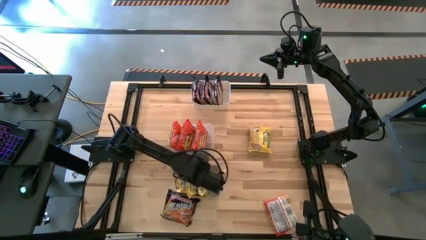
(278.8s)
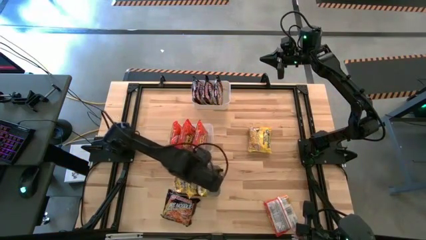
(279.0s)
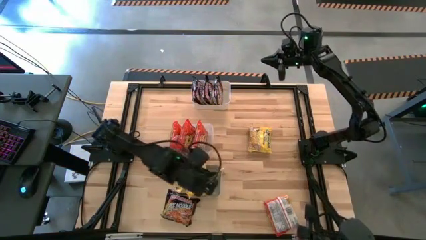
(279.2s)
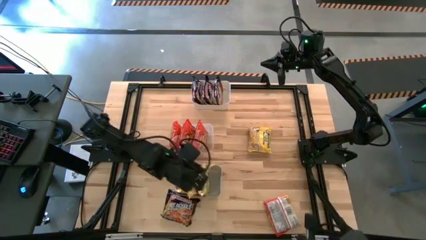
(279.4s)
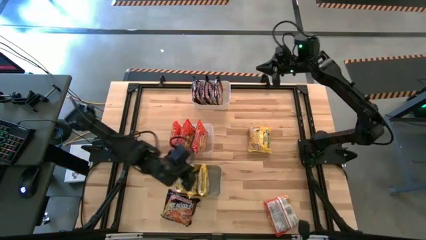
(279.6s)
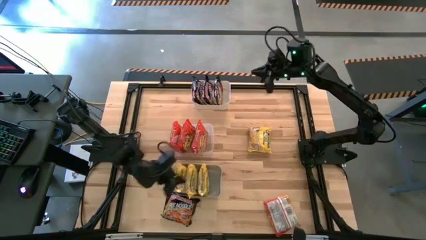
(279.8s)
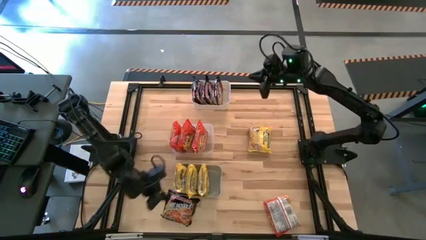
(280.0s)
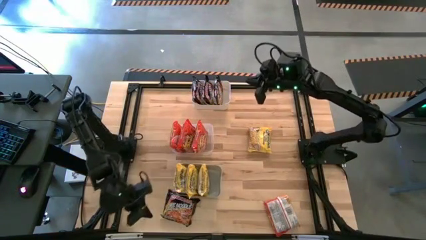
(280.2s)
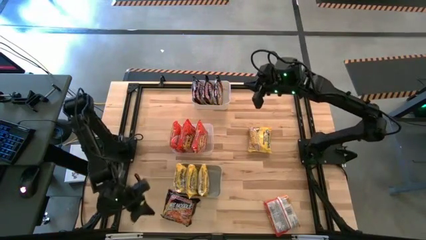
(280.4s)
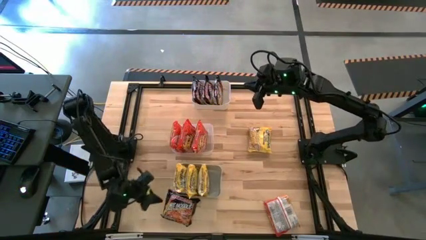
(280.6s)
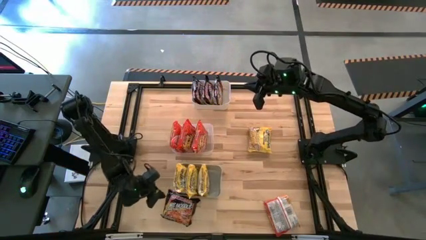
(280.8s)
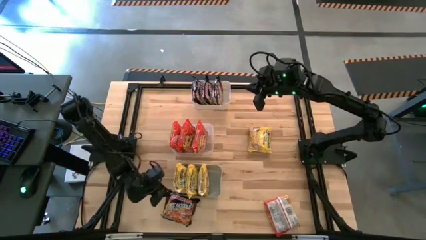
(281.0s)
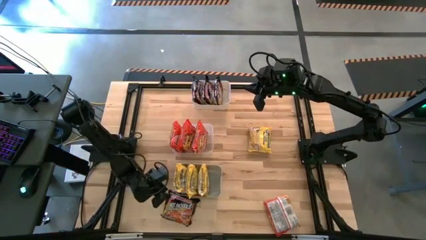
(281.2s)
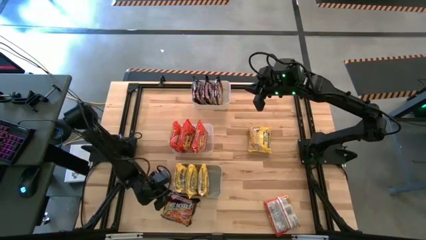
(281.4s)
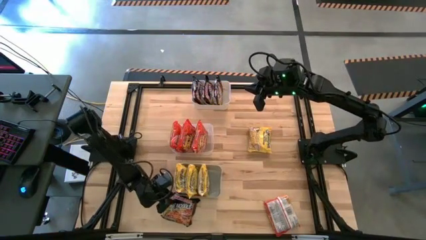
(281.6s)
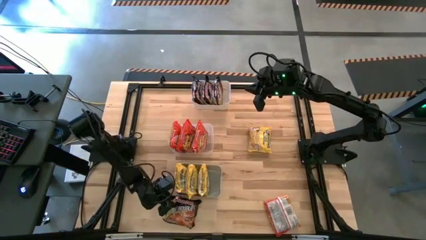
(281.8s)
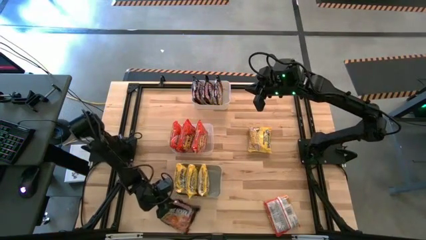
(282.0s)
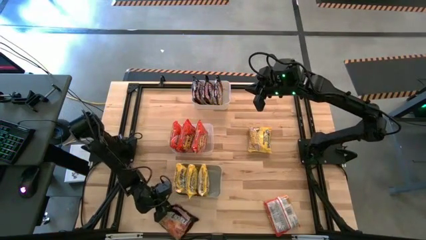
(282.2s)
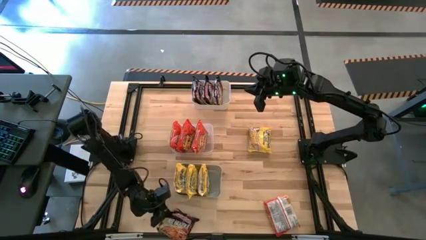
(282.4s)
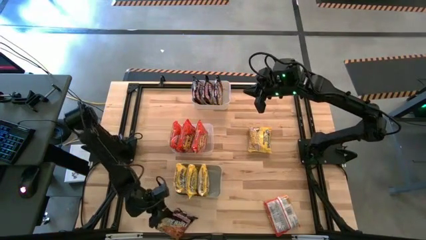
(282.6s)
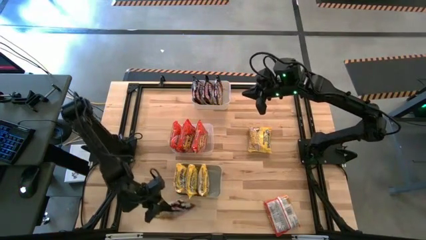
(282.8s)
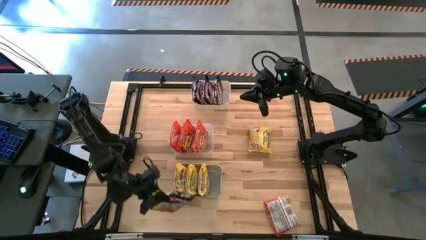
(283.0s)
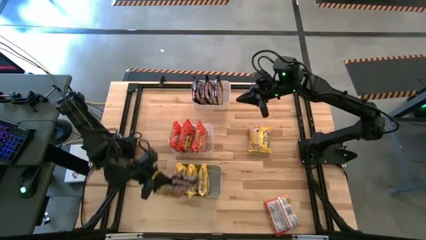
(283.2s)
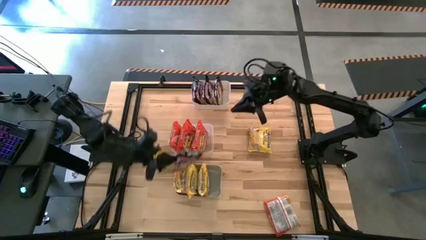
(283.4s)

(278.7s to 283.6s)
Task: Sort Maruchan noodles
Put the black noodle pack into the white bin

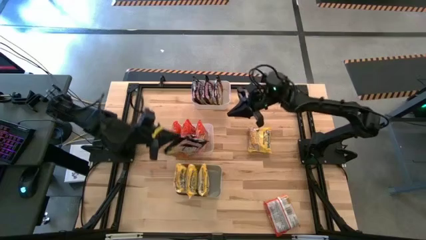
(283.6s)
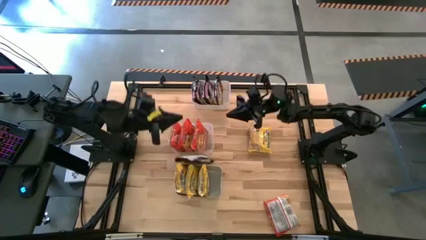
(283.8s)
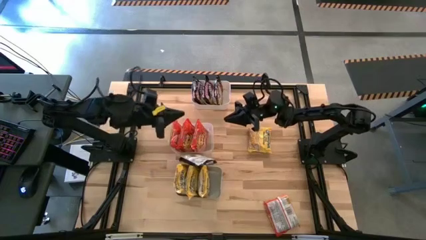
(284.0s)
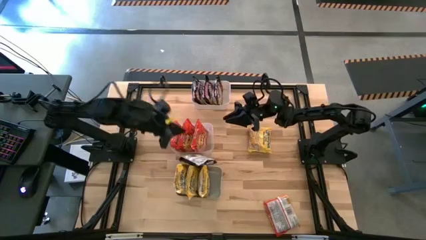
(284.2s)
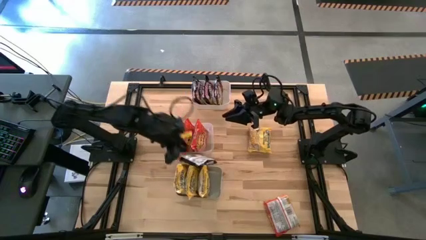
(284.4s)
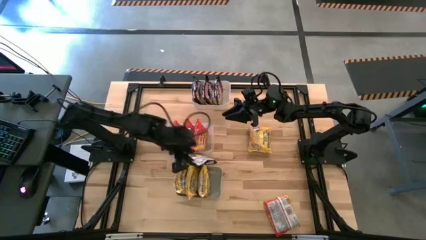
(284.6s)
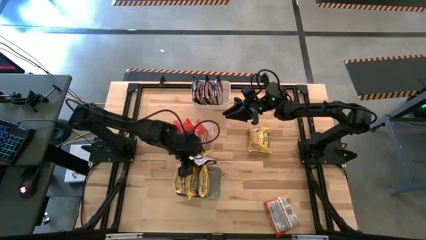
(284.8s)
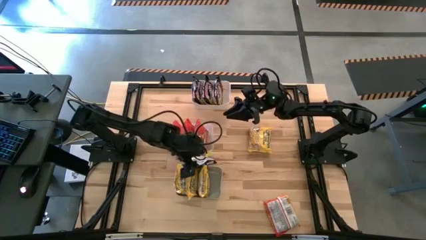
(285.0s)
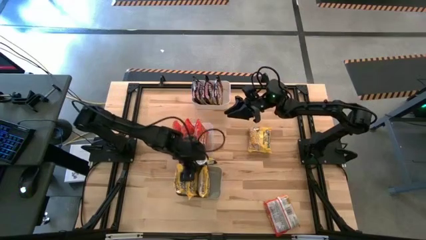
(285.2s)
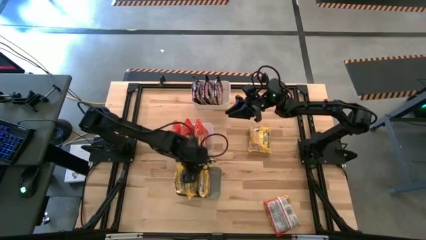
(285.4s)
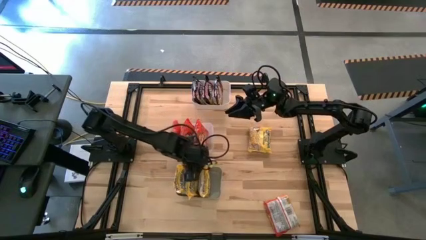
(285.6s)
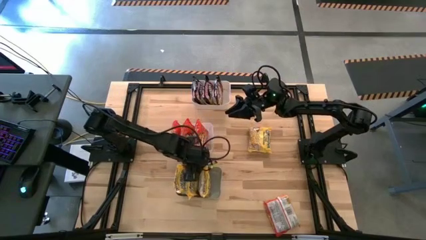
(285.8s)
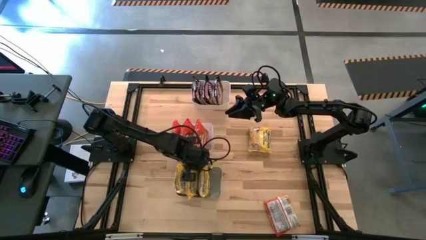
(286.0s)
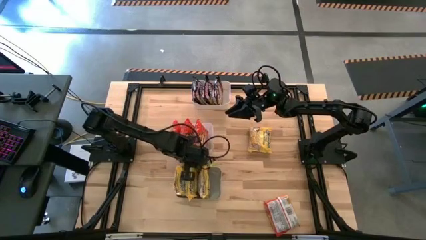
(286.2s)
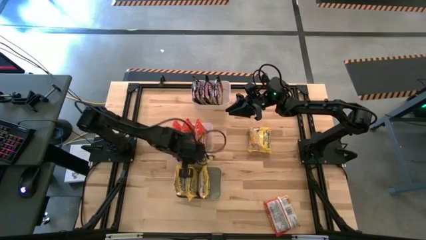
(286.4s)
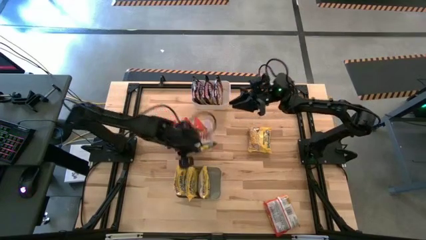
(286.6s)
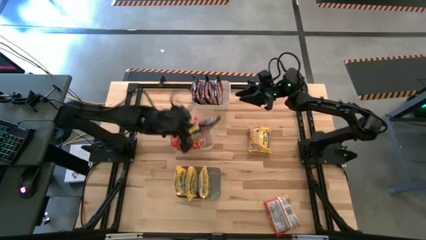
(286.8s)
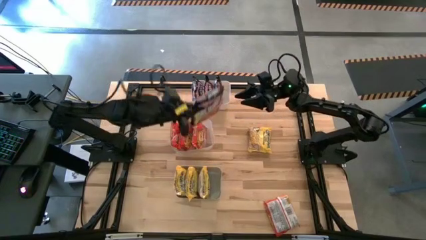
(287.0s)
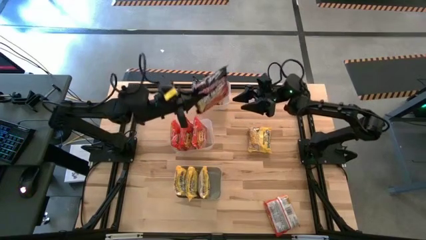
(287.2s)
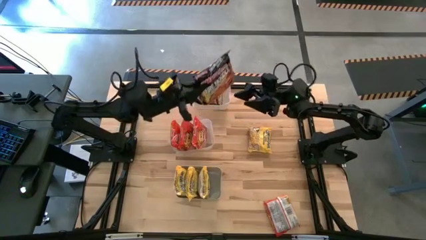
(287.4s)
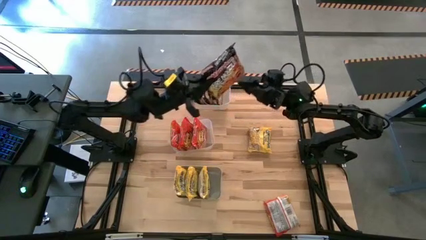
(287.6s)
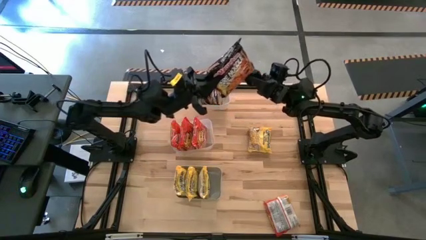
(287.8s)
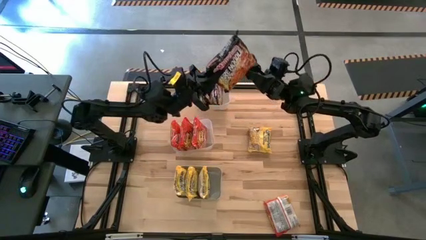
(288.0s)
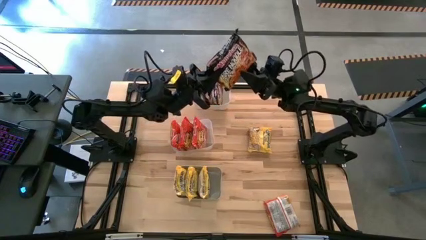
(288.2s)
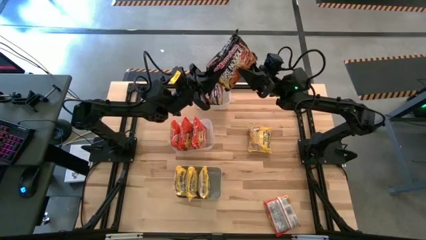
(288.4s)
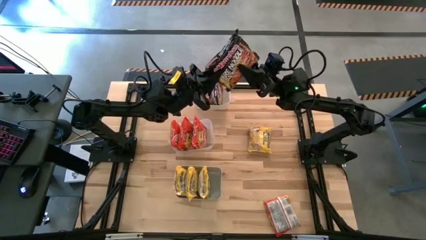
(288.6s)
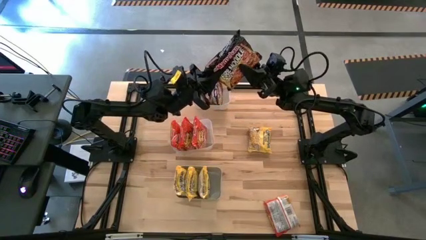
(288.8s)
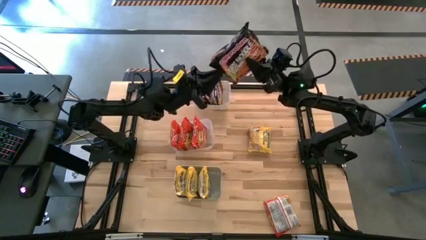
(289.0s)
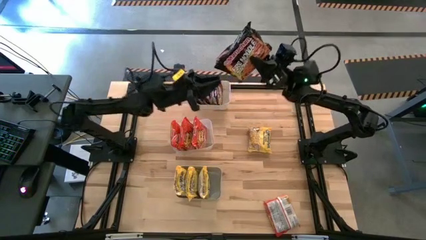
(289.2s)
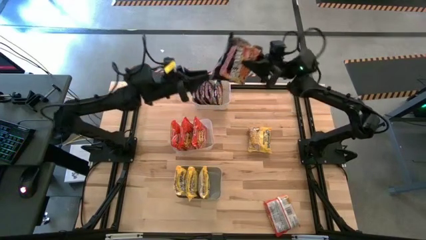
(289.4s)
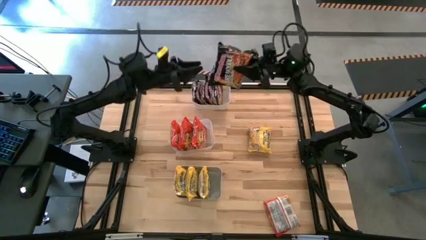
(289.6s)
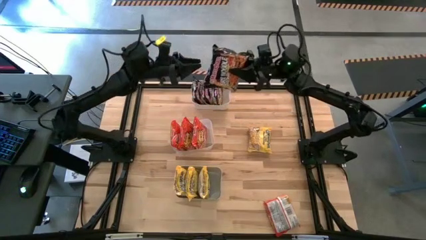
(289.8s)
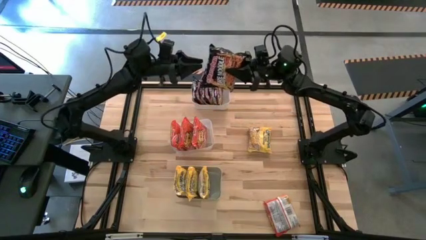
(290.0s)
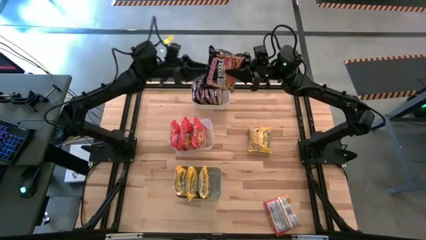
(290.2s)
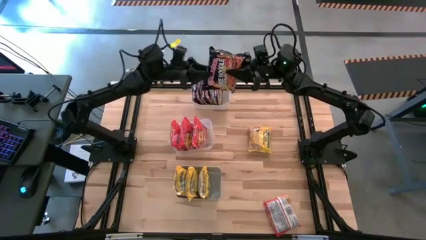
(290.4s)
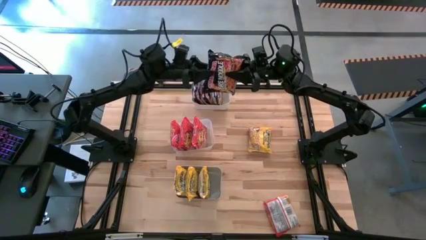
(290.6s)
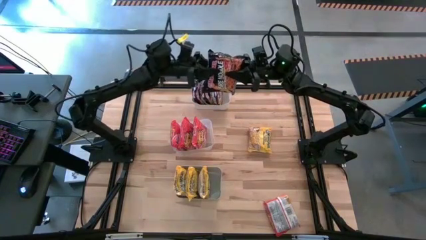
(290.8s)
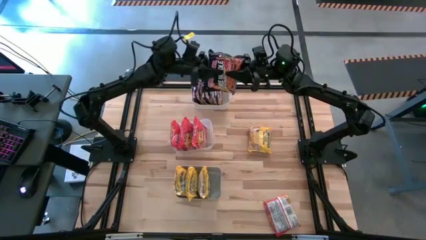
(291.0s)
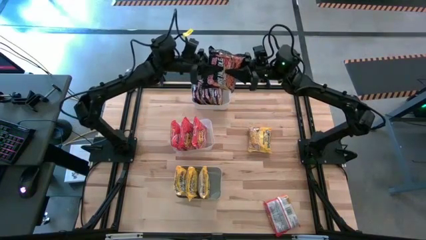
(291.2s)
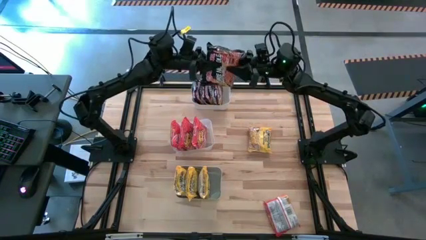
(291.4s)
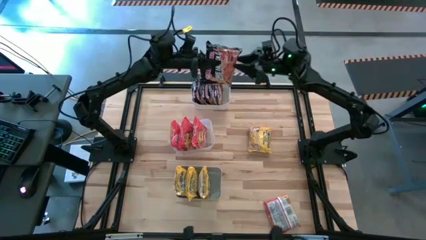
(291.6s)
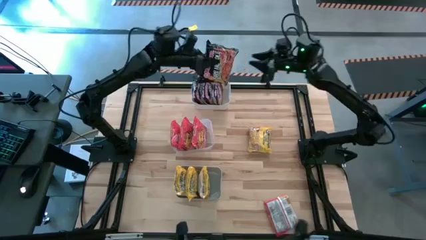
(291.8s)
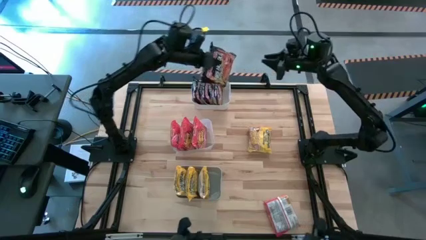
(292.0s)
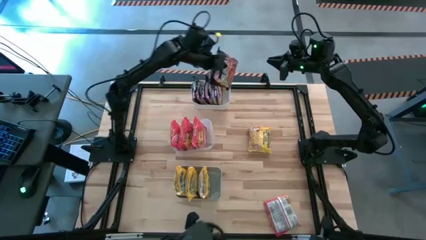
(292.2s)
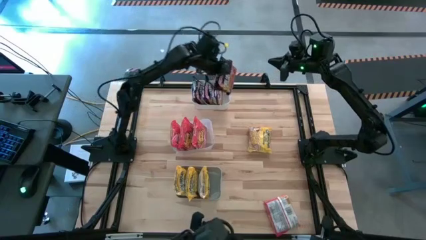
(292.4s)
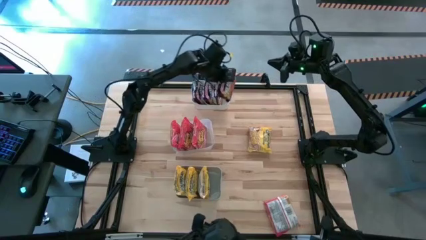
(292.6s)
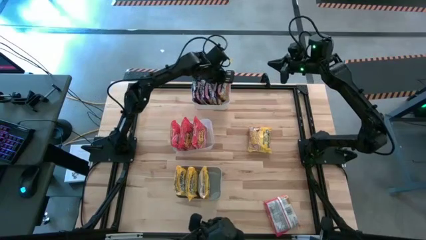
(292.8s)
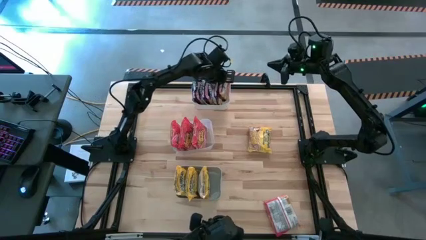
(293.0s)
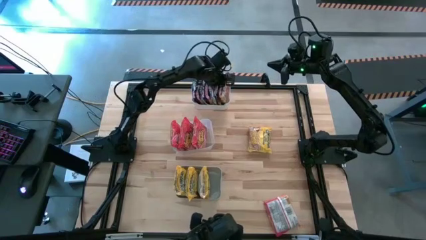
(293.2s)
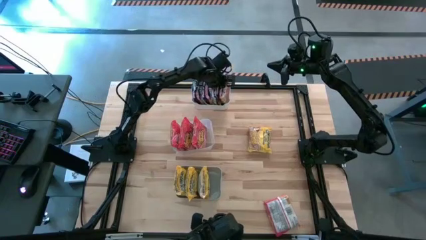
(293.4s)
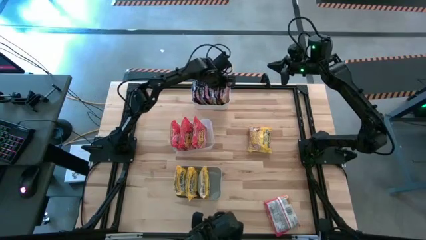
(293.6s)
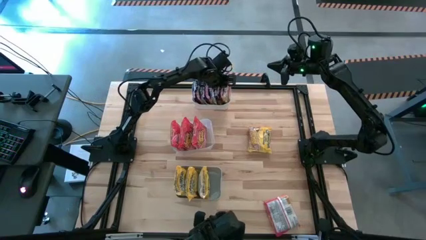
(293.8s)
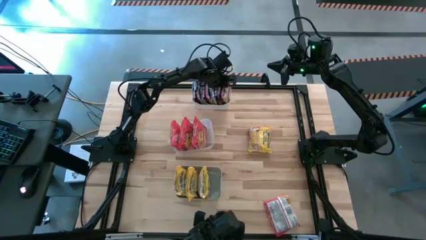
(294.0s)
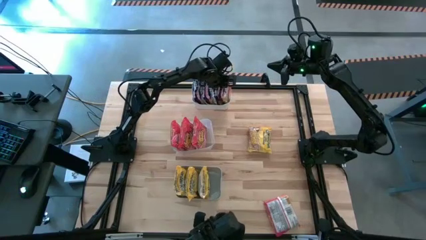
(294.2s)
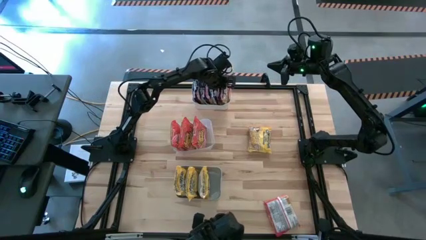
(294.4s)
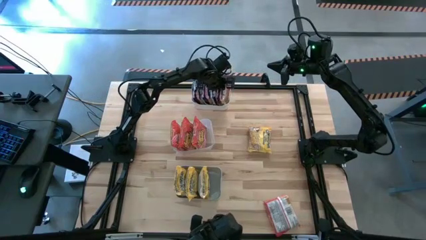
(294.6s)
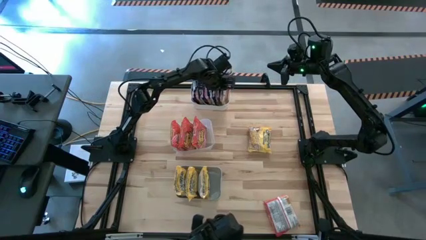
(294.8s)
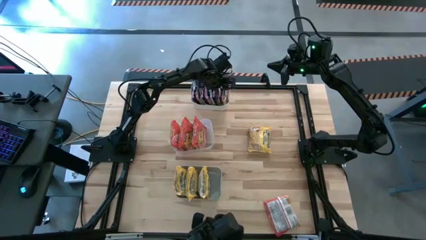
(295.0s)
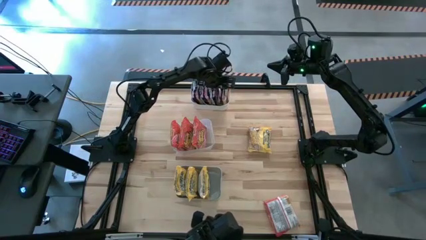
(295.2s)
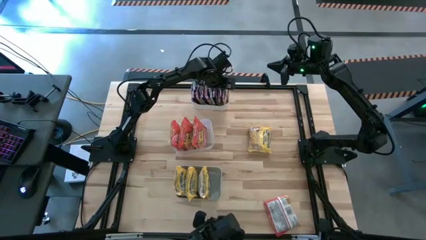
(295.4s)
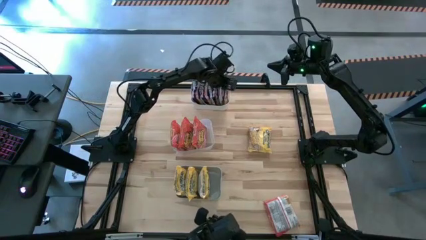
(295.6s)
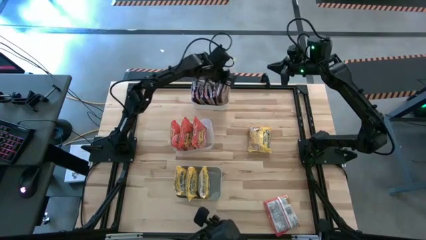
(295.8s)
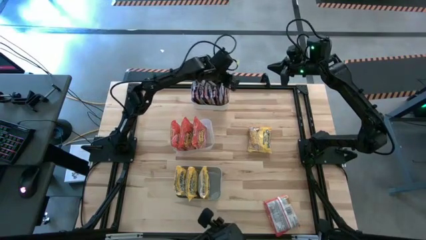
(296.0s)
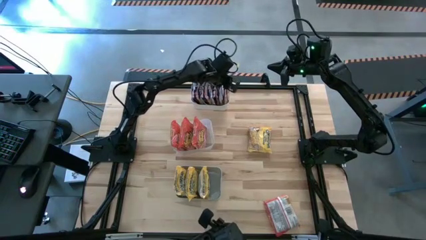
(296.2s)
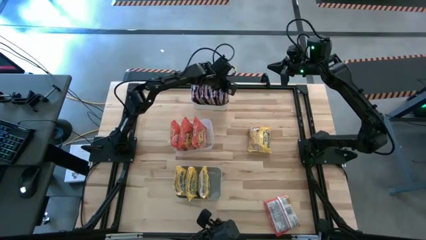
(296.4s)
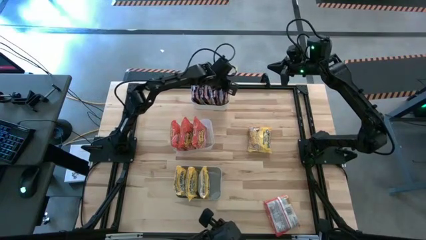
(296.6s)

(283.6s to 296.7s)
Put the black noodle pack into the white bin
